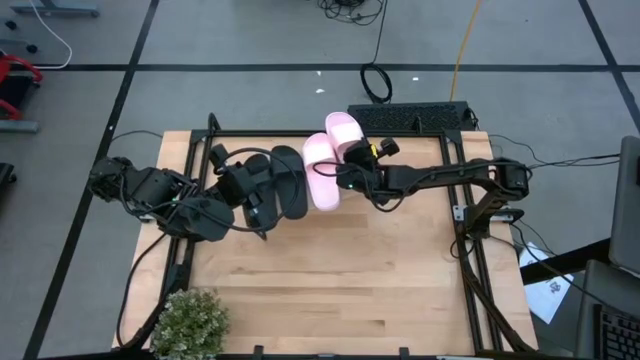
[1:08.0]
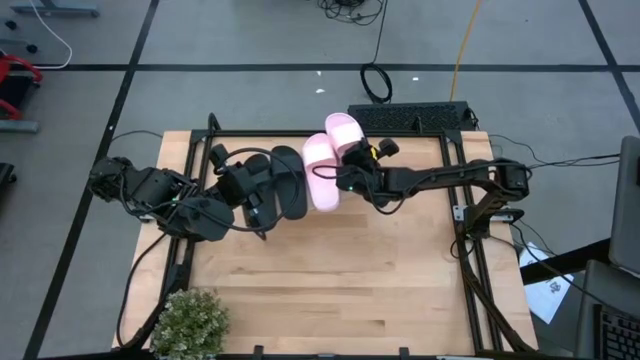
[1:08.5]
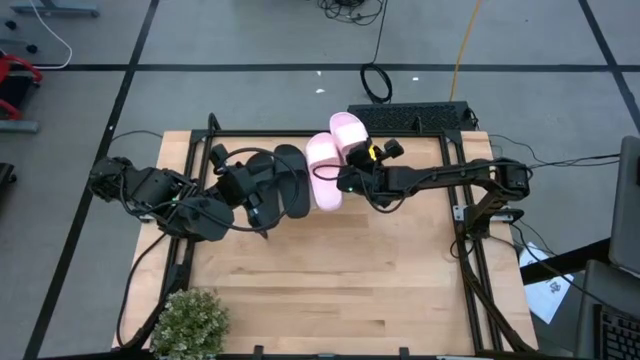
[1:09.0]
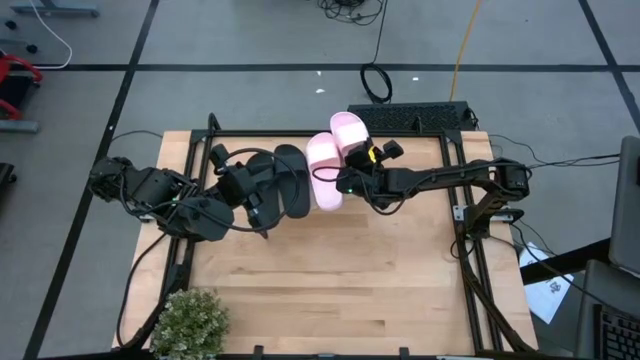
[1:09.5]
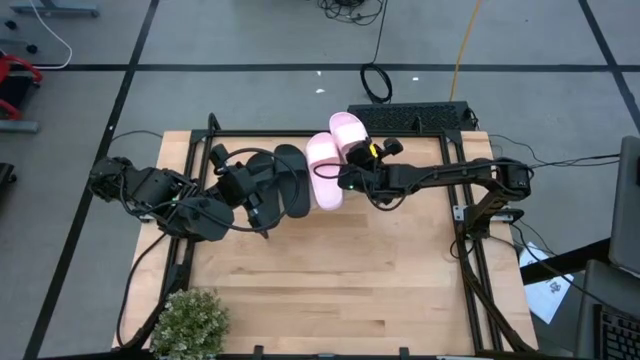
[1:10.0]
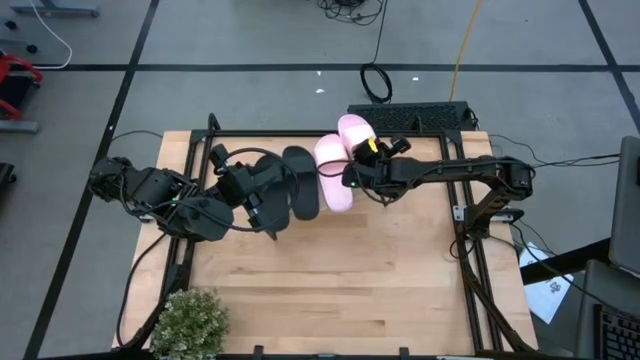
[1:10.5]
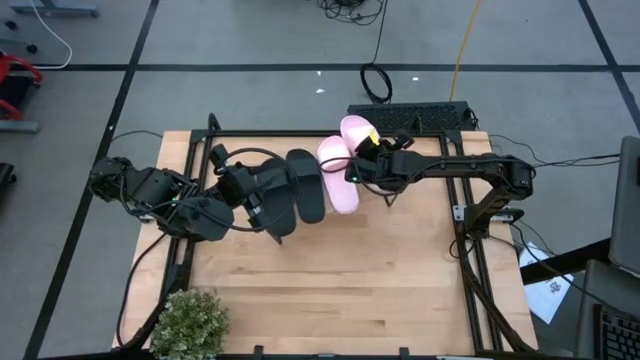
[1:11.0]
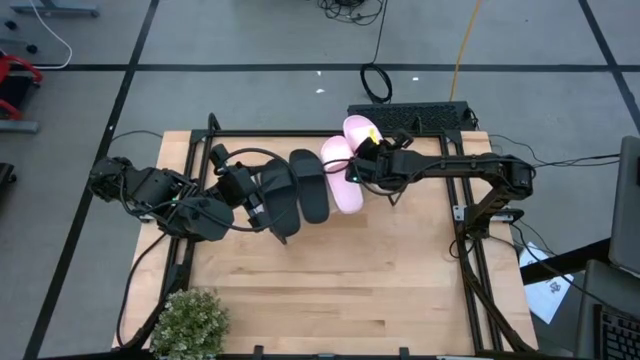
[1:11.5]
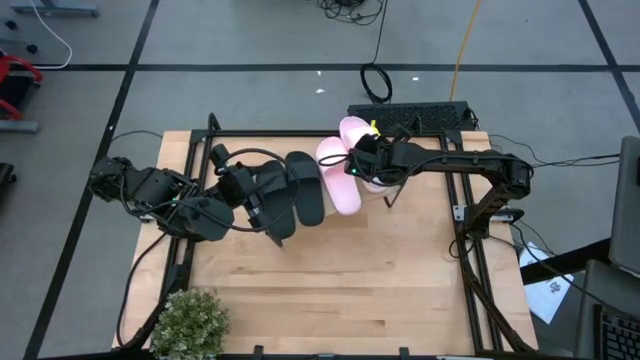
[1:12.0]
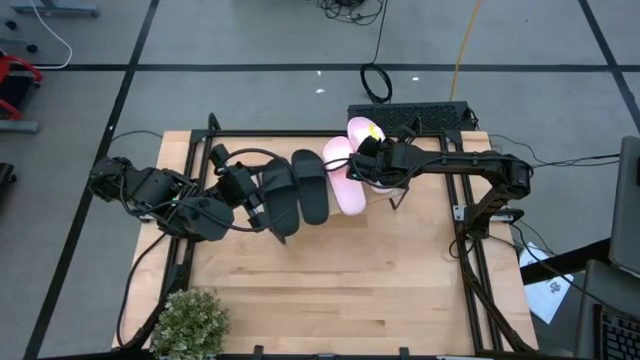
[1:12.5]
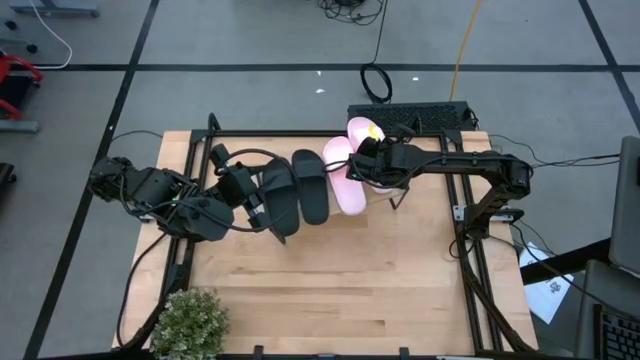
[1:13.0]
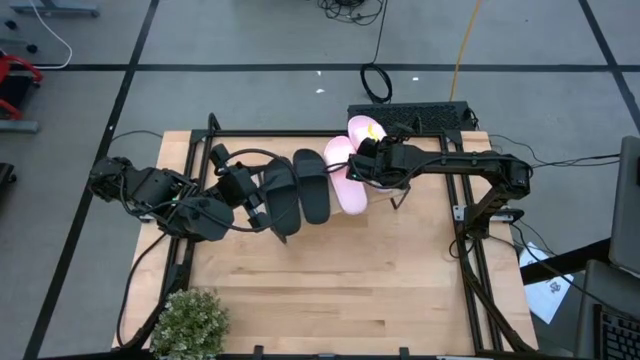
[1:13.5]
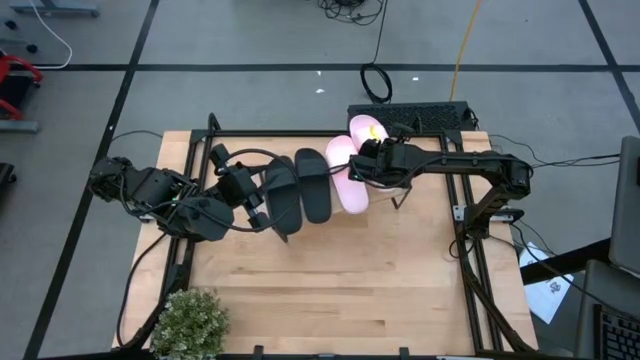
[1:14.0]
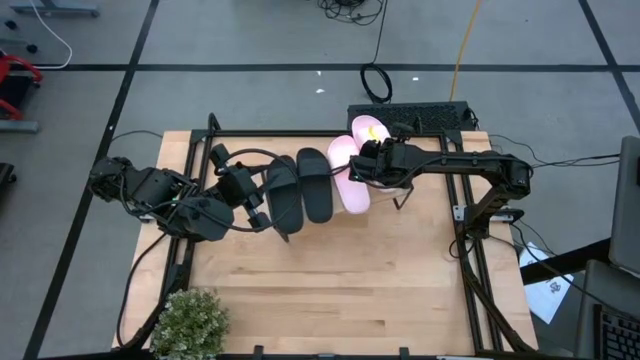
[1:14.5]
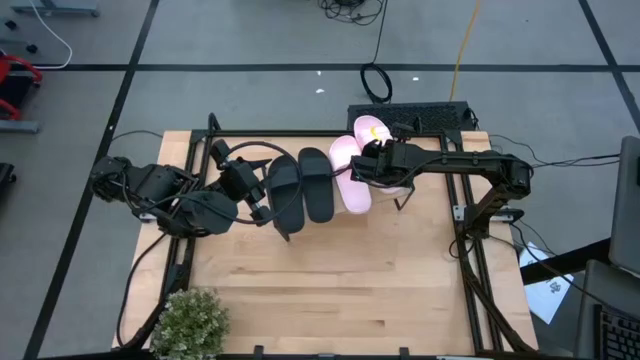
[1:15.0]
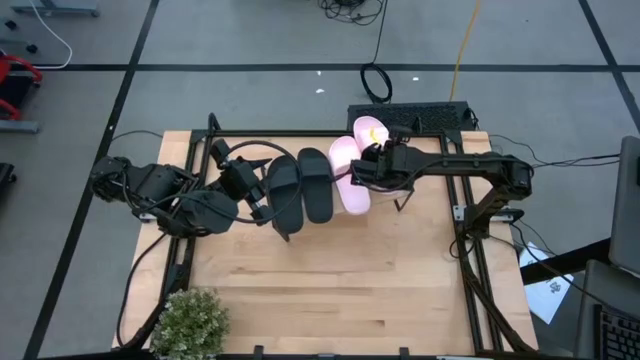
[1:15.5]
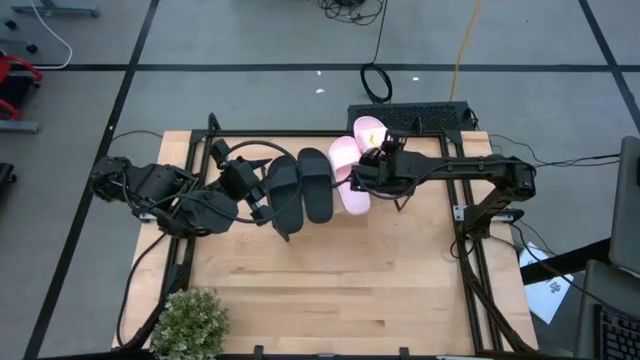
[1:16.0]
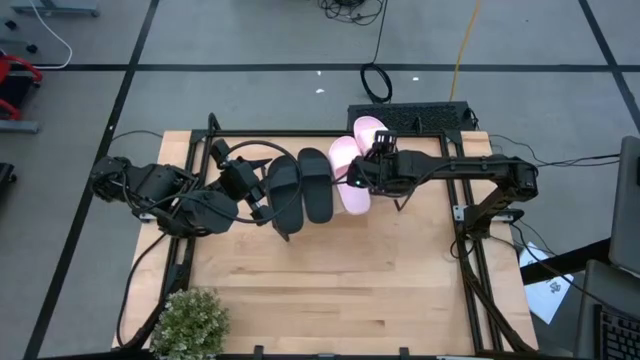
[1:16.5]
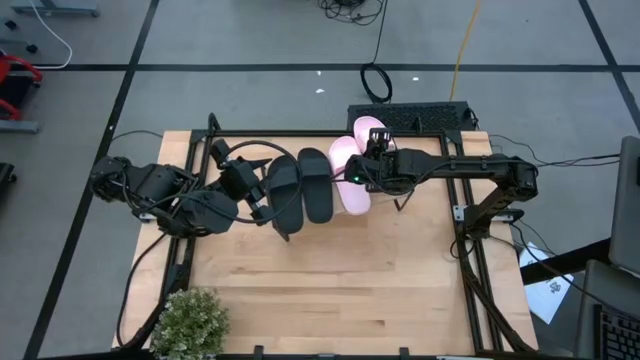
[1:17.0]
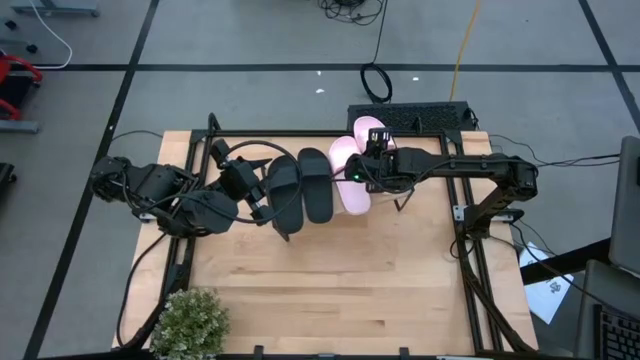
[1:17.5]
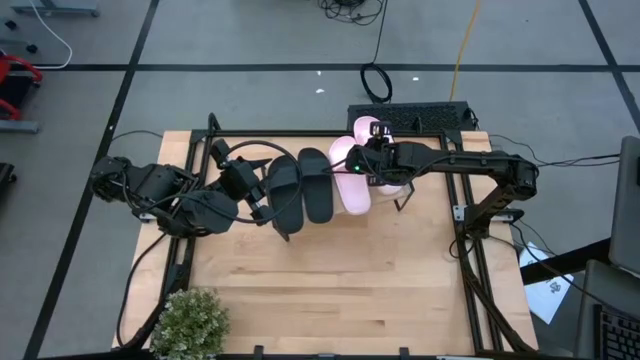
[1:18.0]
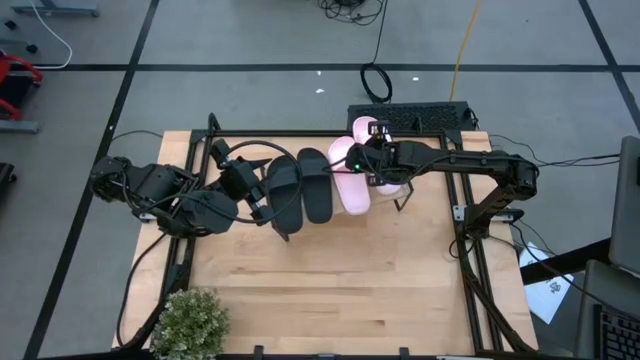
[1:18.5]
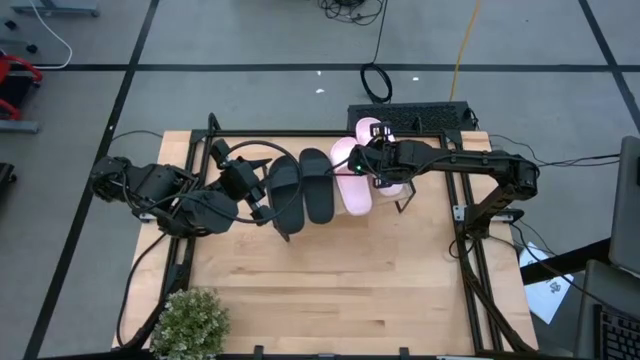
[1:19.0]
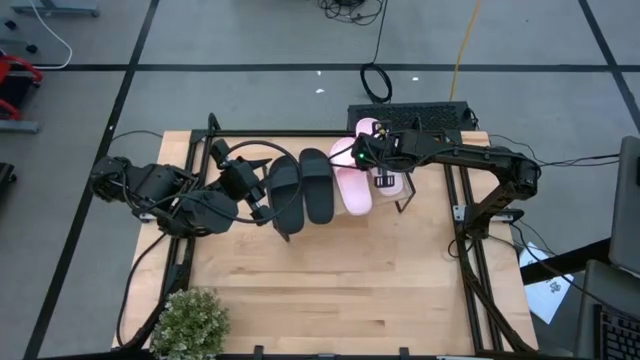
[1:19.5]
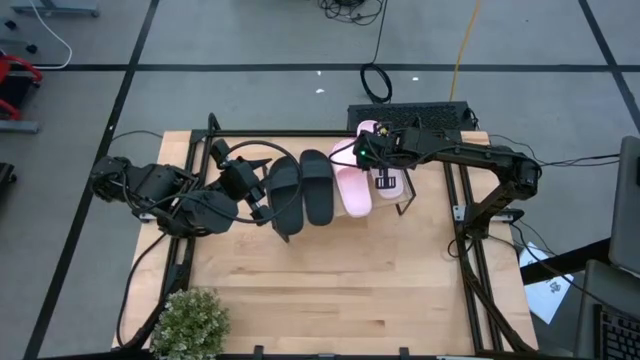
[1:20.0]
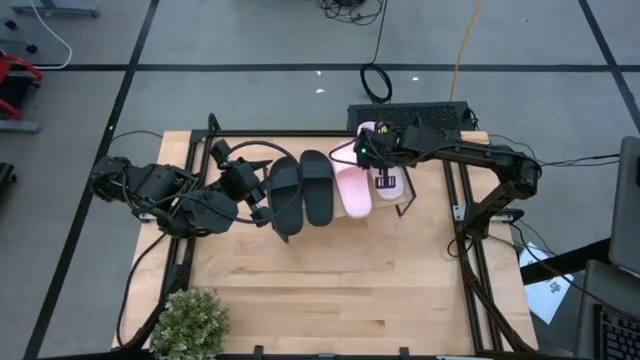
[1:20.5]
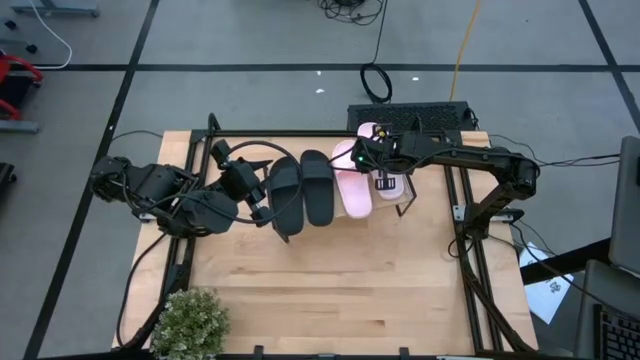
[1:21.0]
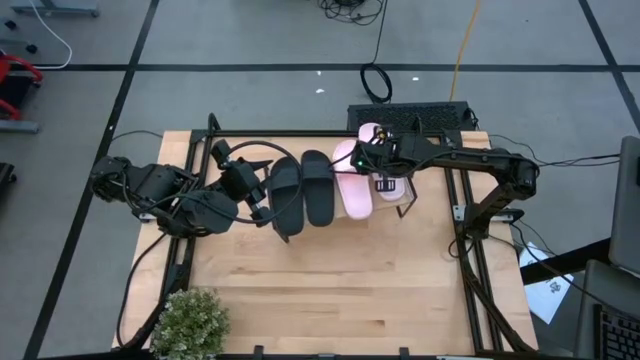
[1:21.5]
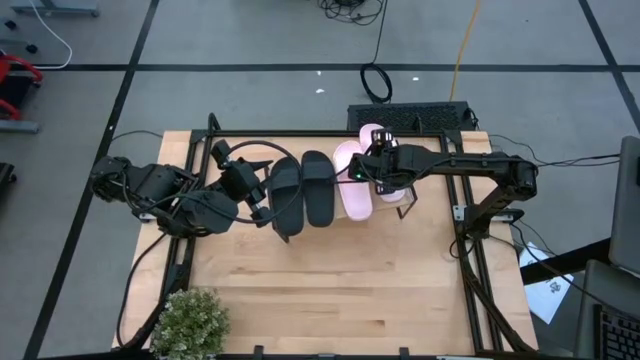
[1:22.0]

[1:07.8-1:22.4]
Task: Pick and place slides into the shelf
Put the pink slide on the shelf
